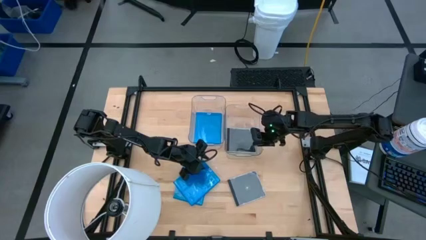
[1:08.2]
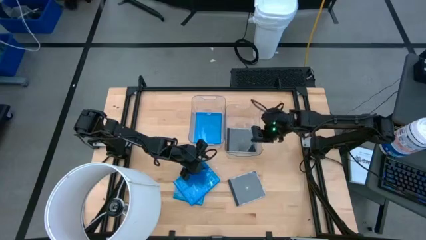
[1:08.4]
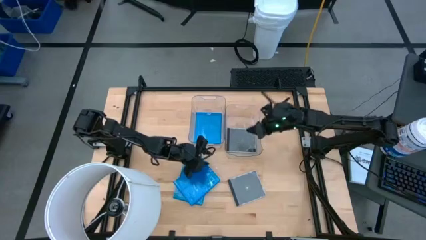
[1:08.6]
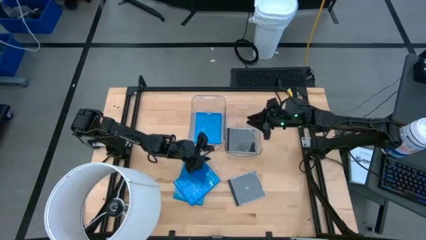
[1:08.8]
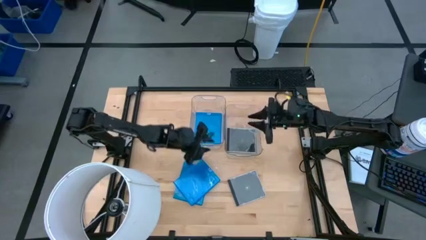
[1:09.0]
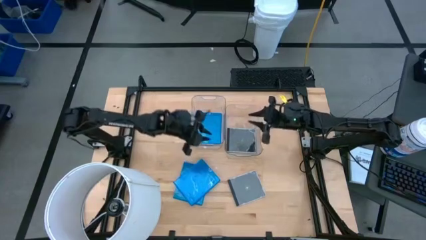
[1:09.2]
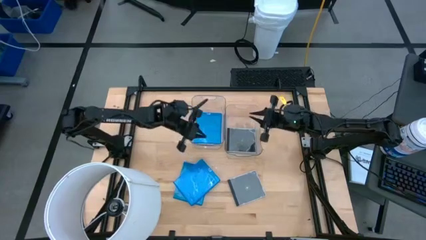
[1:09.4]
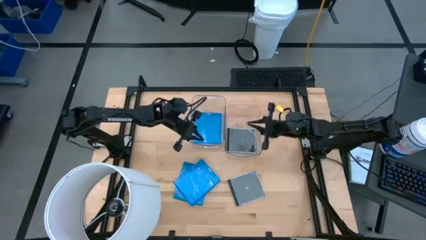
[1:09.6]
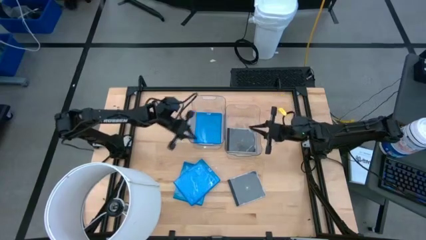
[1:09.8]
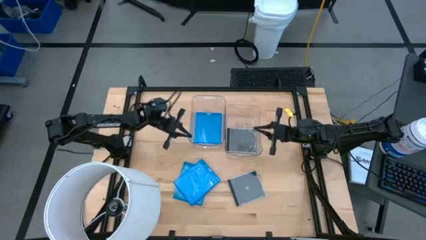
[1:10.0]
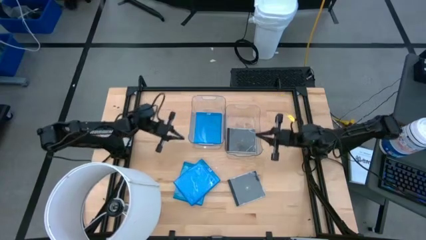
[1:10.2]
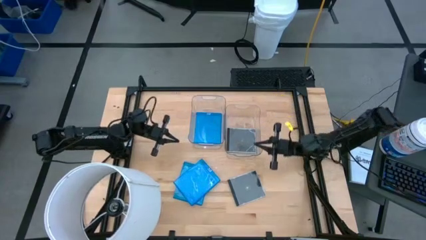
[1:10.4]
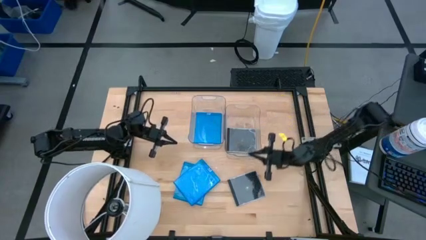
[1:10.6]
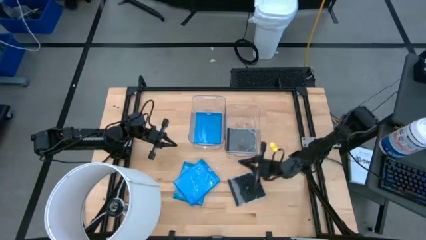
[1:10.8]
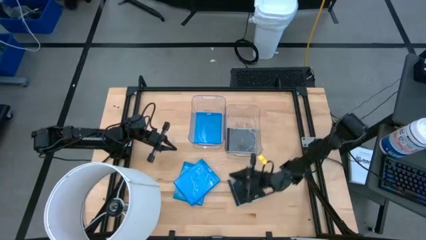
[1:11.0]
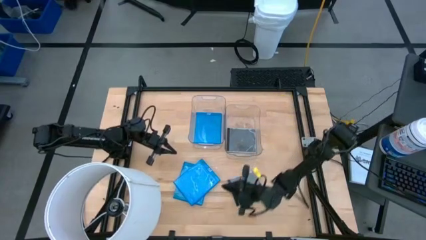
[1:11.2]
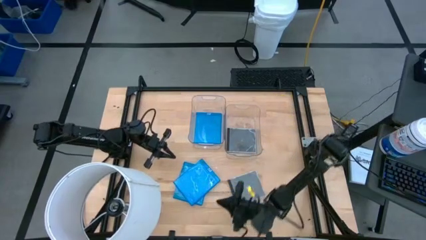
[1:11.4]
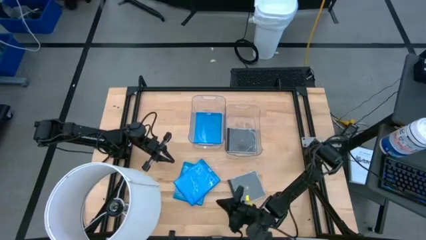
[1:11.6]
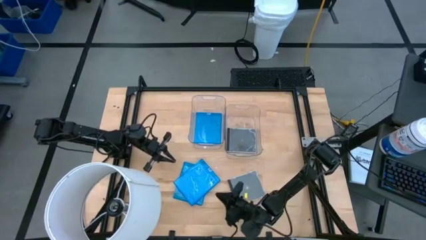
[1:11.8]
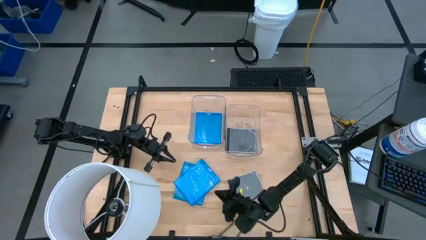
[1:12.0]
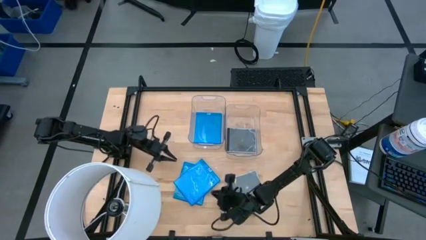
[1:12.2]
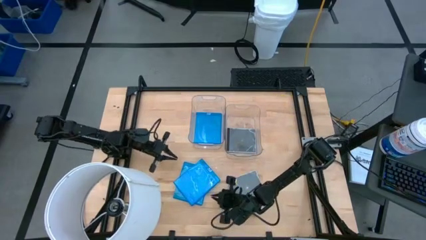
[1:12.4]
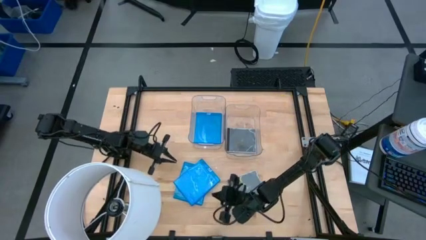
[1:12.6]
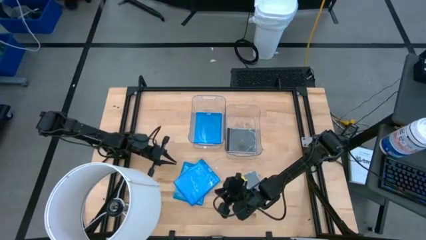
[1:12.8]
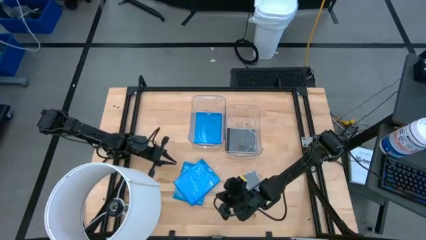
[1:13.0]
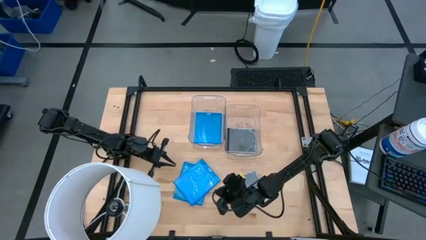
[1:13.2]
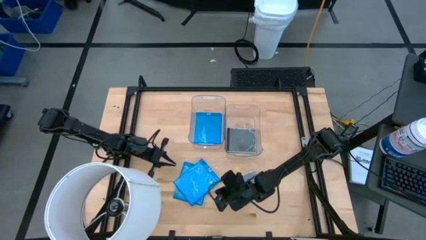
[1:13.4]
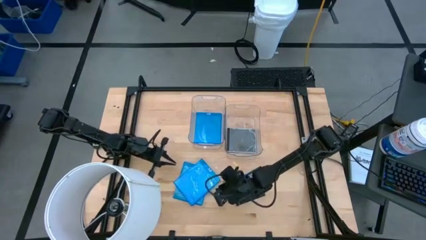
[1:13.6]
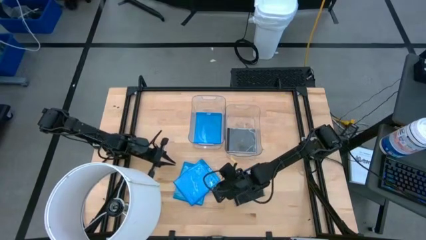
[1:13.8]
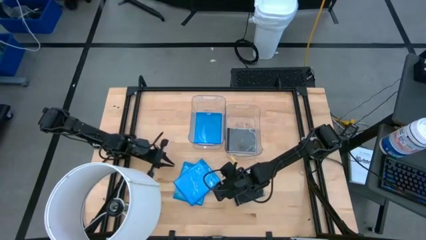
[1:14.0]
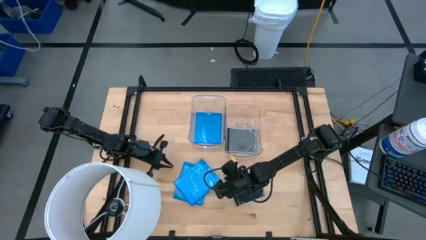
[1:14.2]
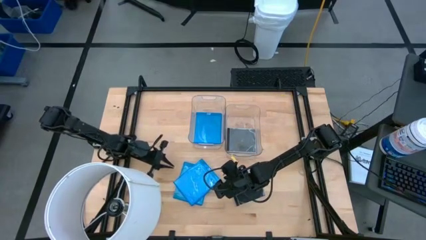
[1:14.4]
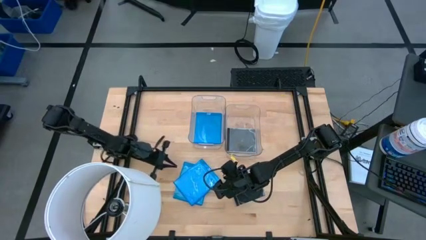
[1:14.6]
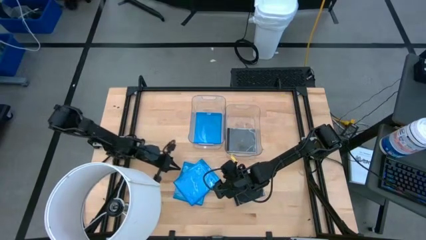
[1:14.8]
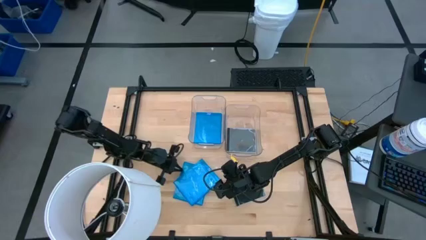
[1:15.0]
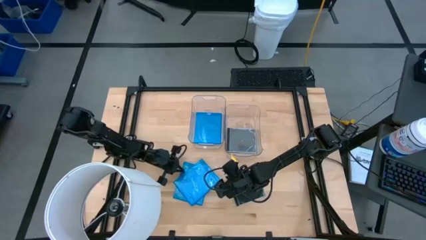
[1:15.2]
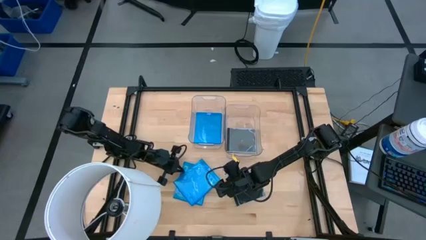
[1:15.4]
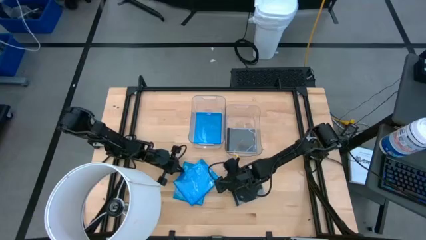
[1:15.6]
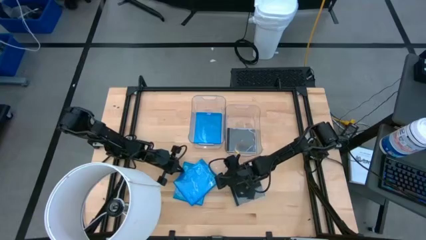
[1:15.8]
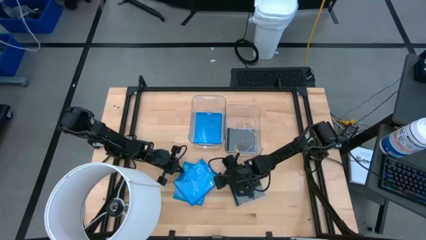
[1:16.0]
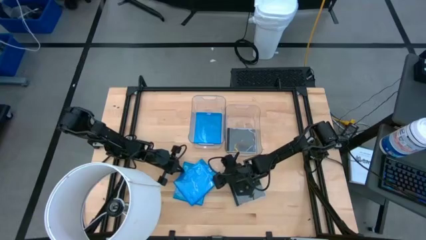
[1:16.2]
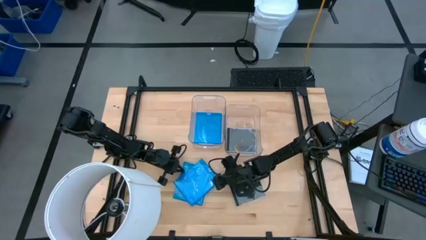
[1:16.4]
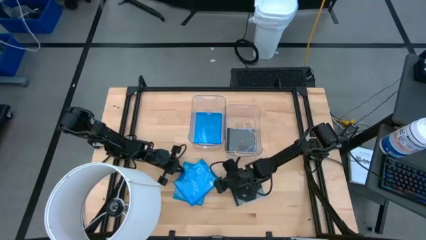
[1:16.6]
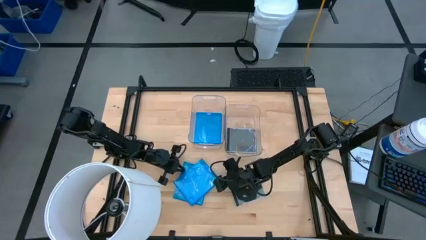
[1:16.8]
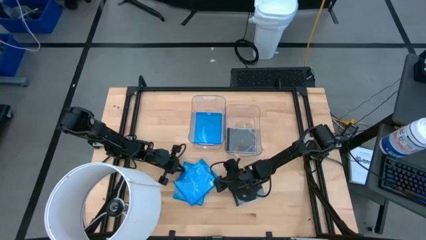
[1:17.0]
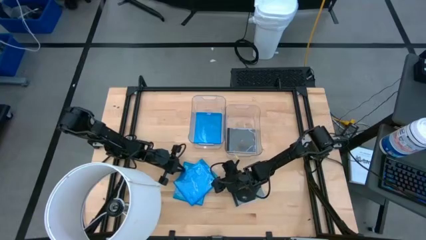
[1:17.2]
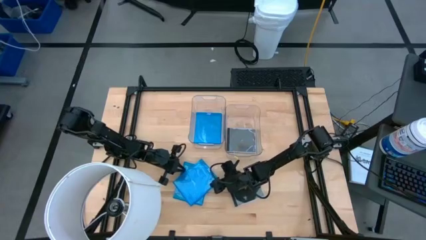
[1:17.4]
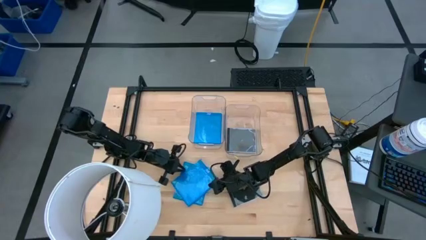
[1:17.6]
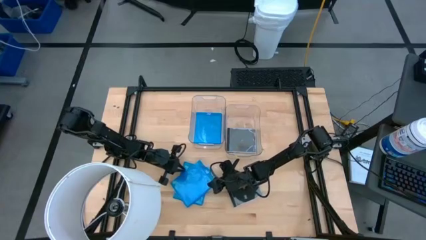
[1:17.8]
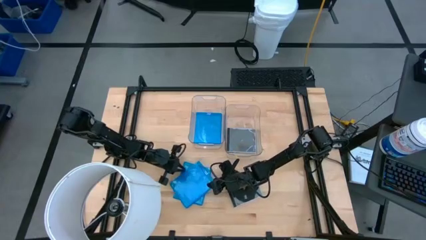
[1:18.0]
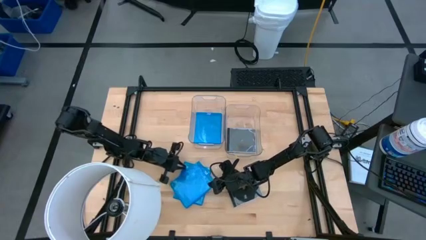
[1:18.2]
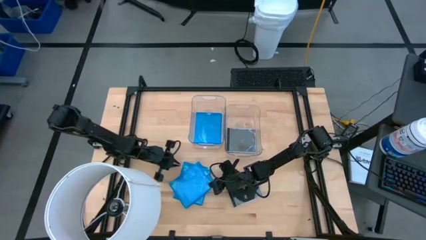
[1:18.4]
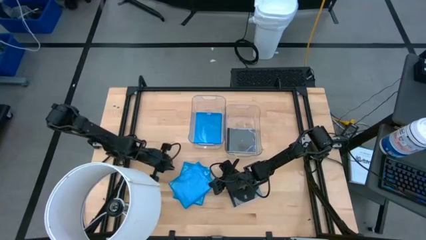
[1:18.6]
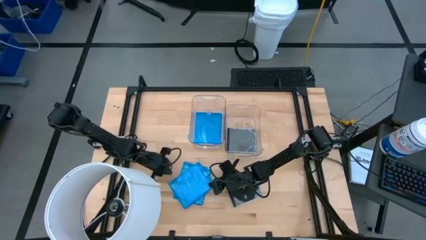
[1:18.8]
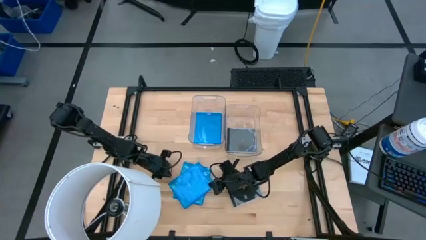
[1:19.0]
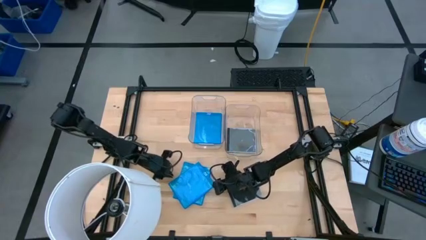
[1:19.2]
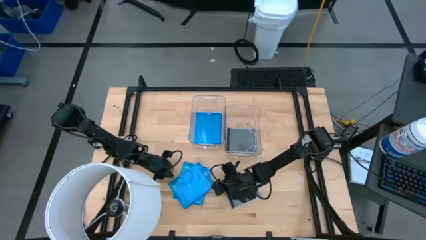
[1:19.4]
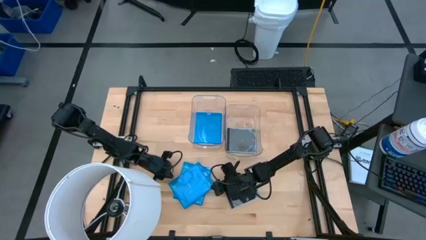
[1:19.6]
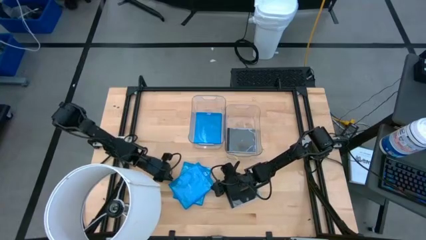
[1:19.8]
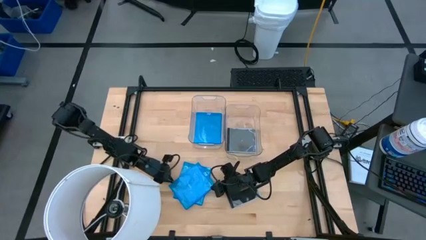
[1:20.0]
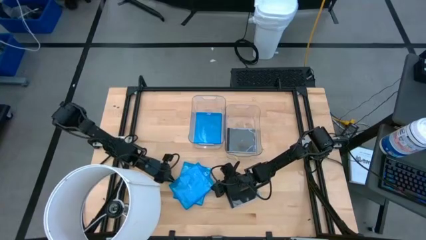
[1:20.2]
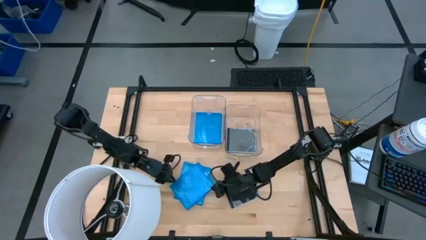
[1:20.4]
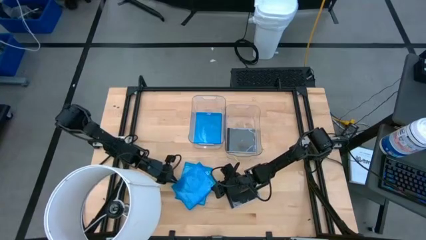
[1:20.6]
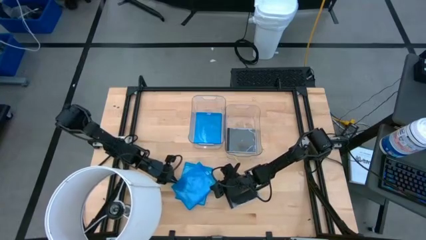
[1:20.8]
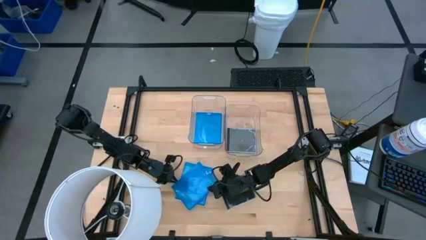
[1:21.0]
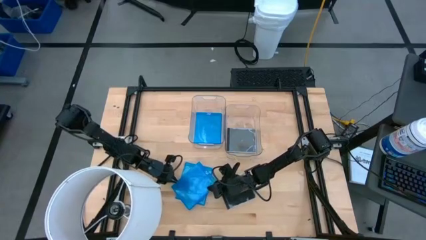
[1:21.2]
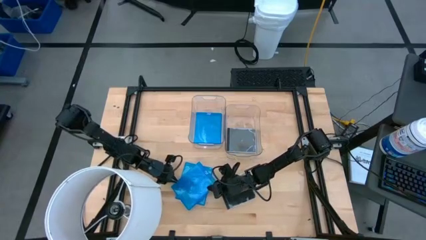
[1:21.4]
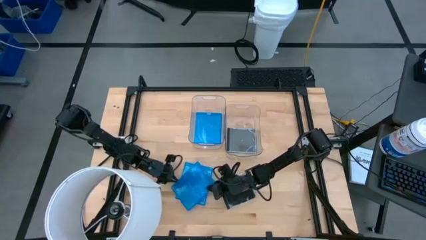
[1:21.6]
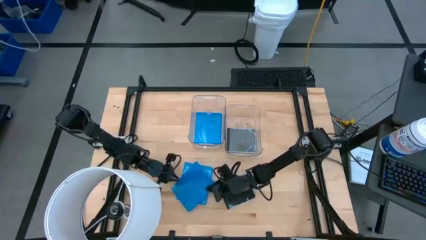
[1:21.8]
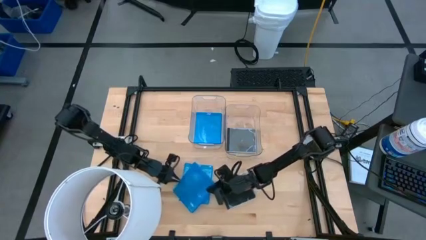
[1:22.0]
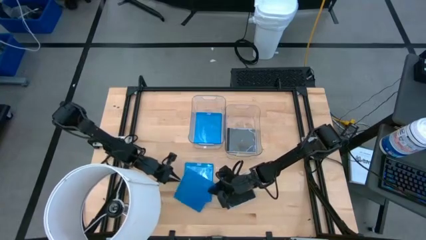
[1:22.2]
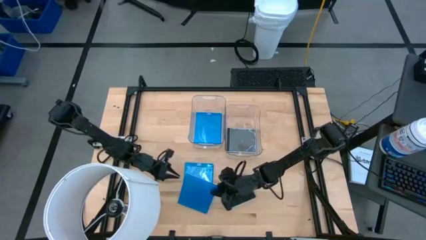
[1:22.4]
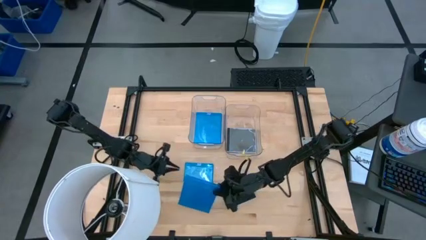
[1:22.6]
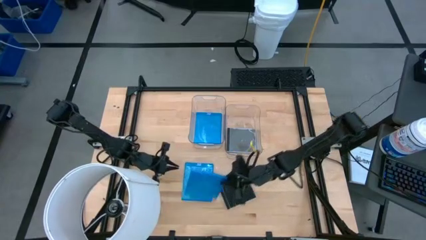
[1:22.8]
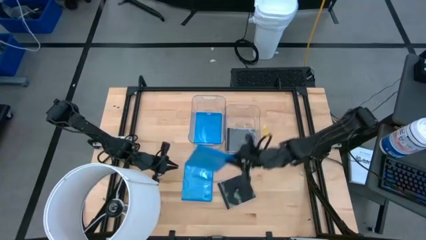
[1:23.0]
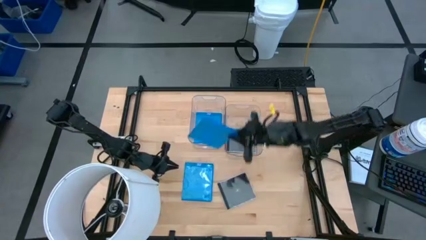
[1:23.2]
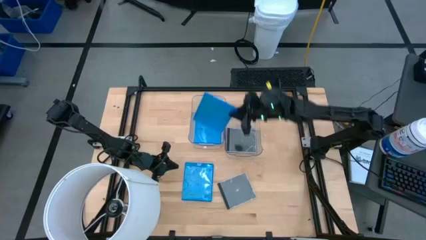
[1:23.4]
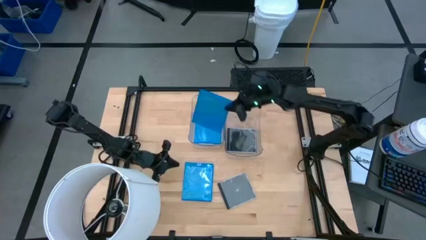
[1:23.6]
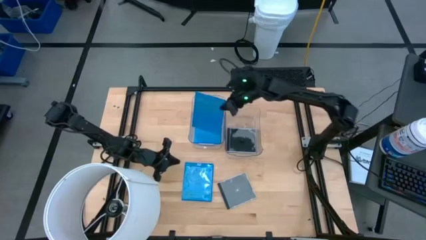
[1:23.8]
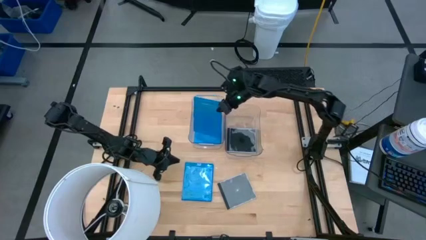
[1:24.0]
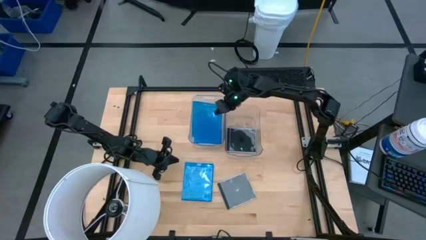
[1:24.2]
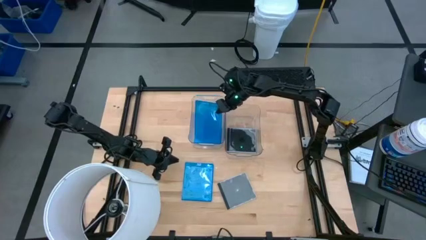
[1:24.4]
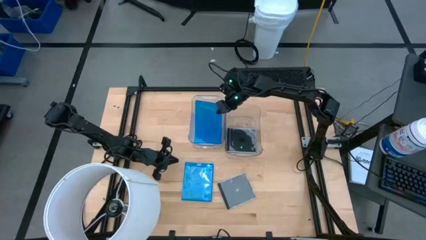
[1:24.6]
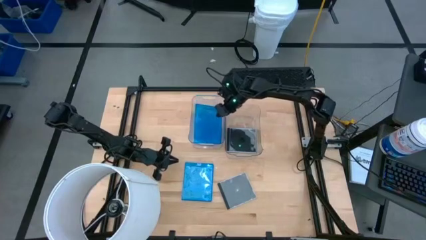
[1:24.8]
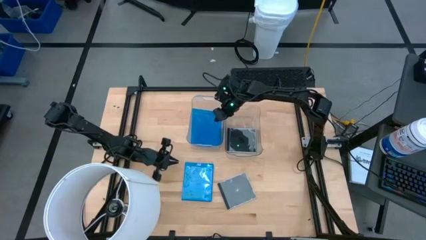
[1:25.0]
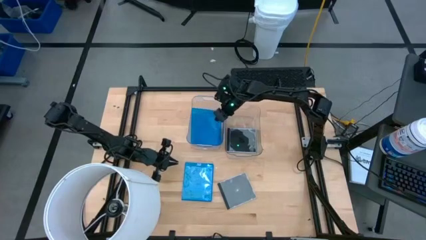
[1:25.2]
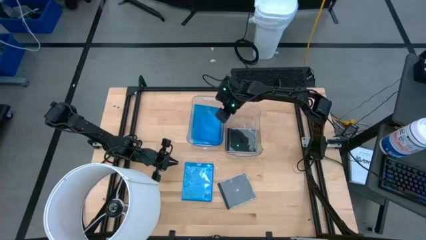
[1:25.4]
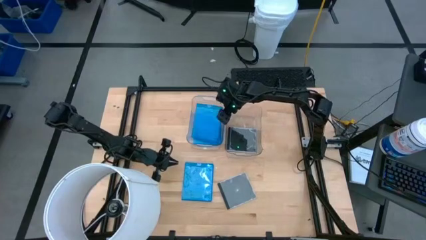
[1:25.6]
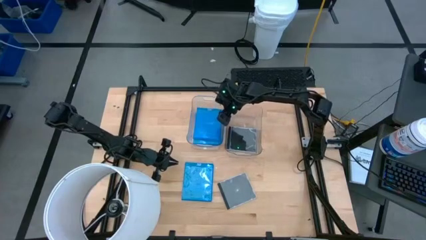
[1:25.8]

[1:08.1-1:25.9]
Task: Pick & place jewel cases by type
Put the blue CD case into the left transparent bin
